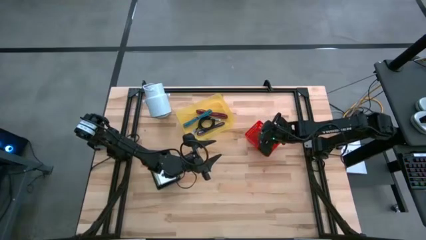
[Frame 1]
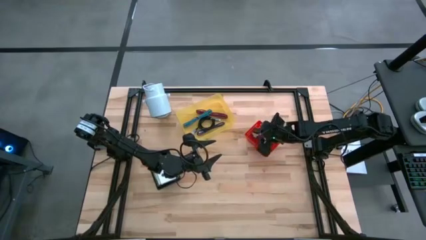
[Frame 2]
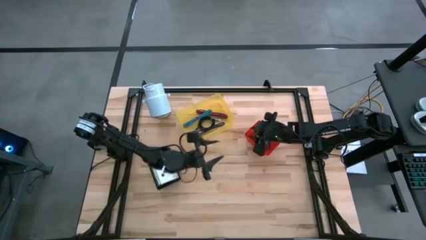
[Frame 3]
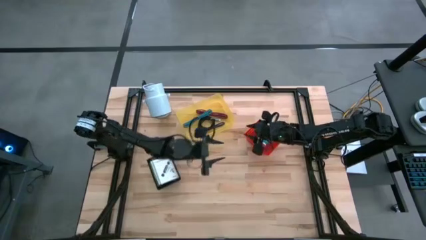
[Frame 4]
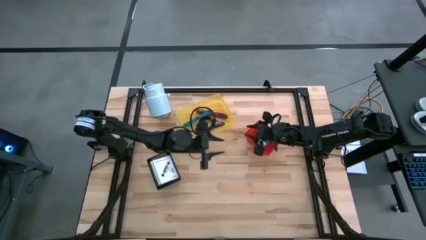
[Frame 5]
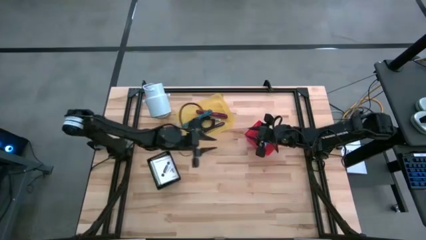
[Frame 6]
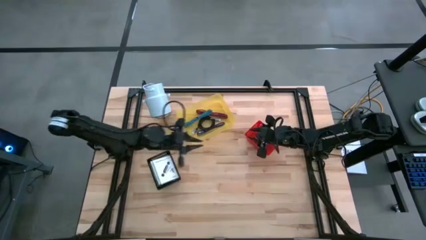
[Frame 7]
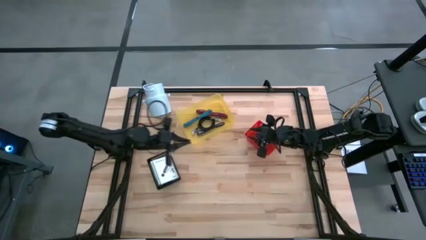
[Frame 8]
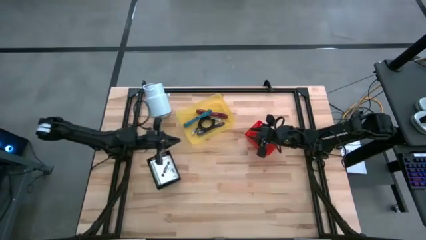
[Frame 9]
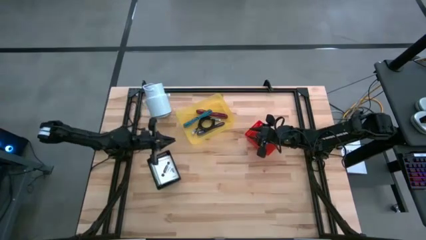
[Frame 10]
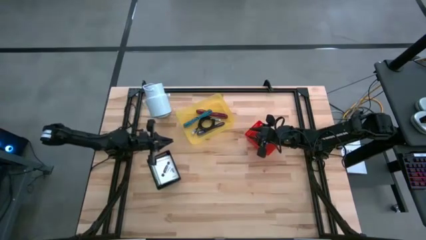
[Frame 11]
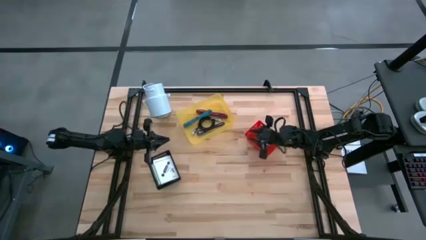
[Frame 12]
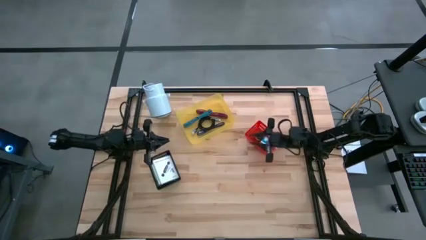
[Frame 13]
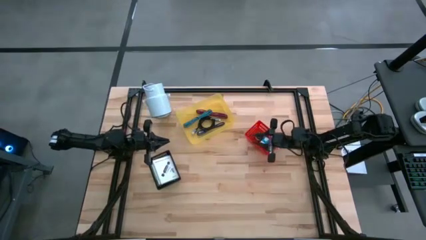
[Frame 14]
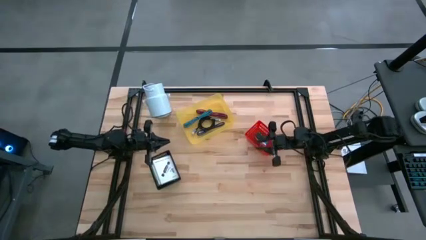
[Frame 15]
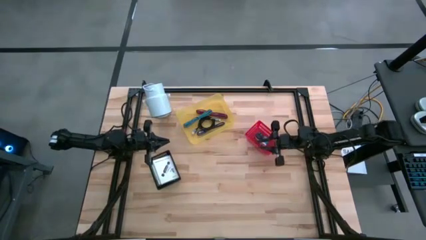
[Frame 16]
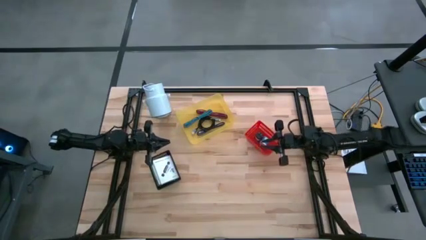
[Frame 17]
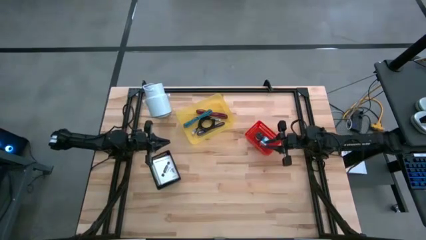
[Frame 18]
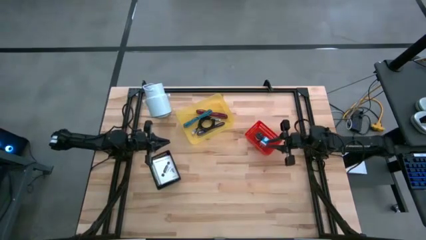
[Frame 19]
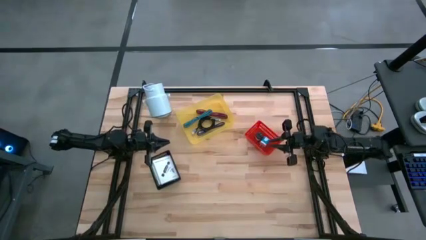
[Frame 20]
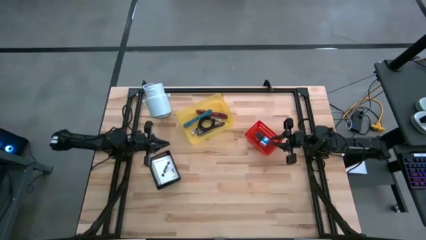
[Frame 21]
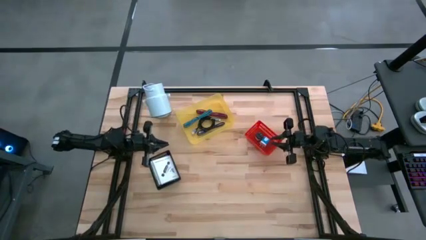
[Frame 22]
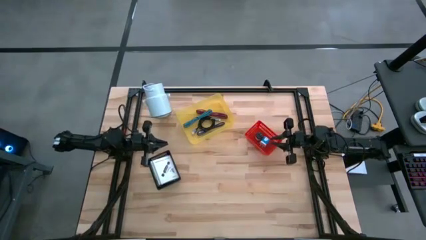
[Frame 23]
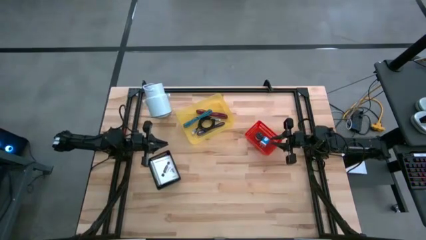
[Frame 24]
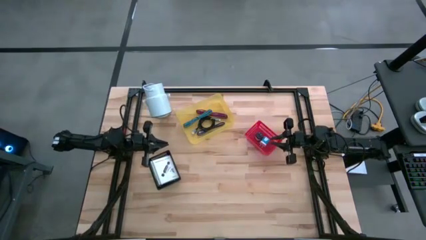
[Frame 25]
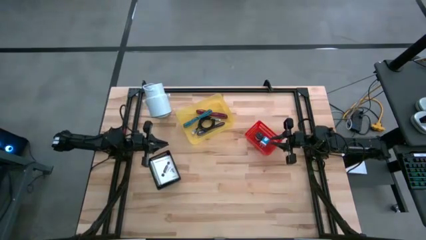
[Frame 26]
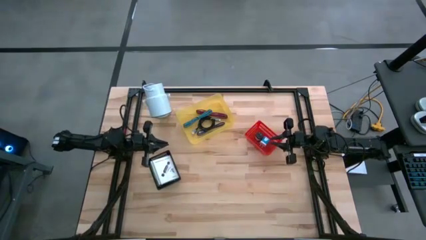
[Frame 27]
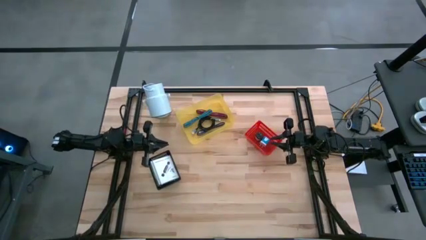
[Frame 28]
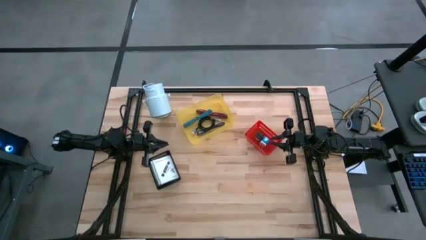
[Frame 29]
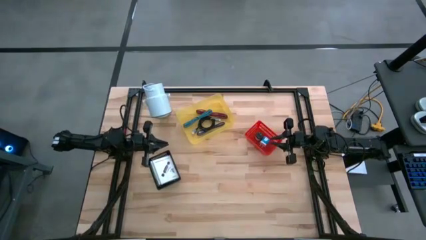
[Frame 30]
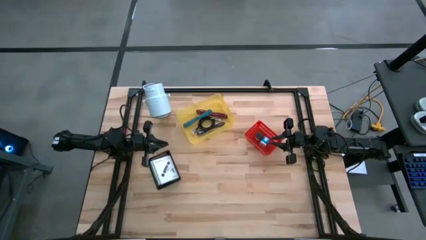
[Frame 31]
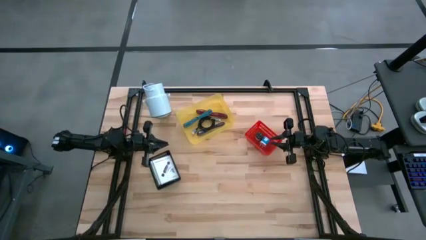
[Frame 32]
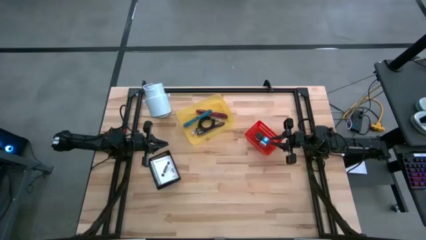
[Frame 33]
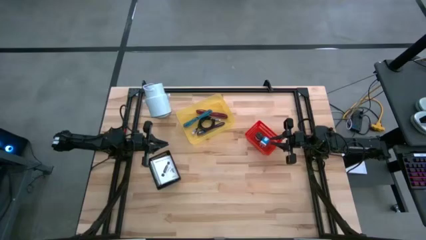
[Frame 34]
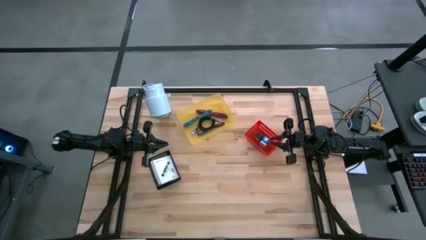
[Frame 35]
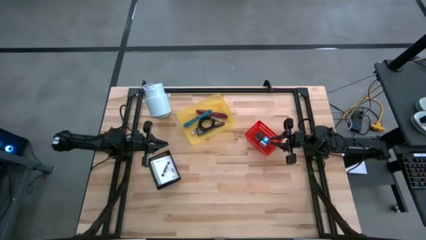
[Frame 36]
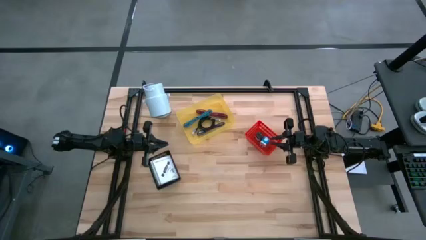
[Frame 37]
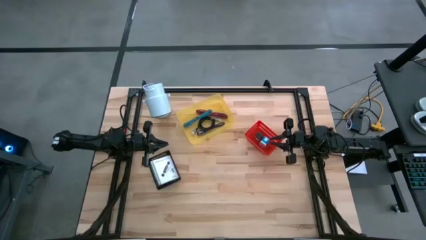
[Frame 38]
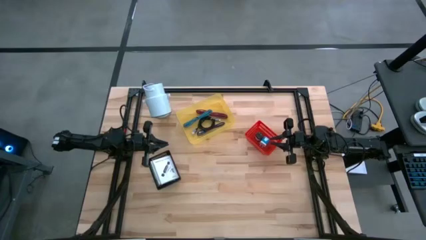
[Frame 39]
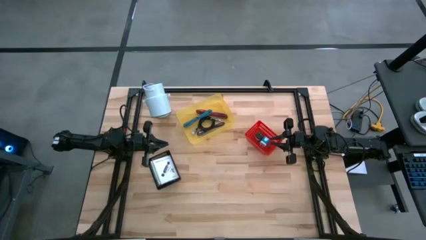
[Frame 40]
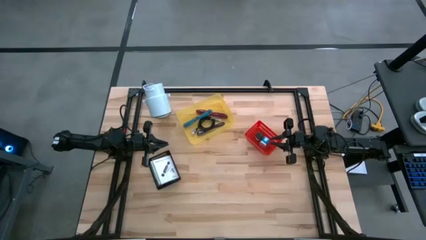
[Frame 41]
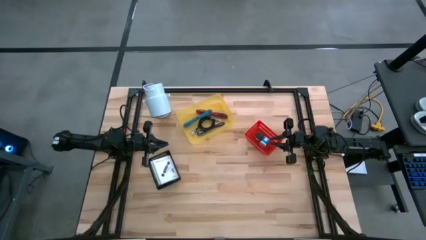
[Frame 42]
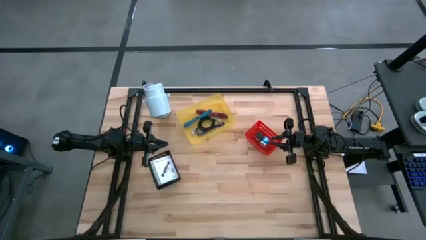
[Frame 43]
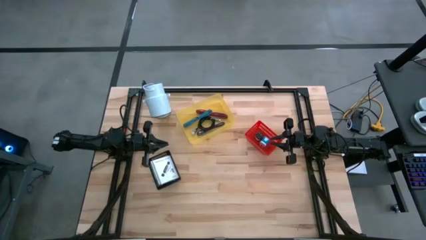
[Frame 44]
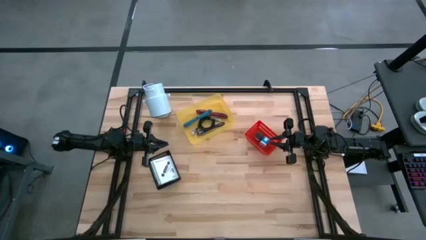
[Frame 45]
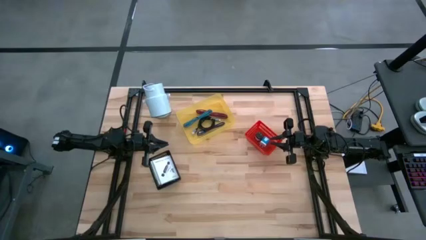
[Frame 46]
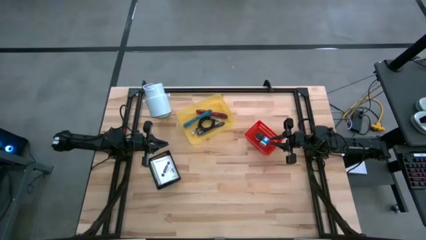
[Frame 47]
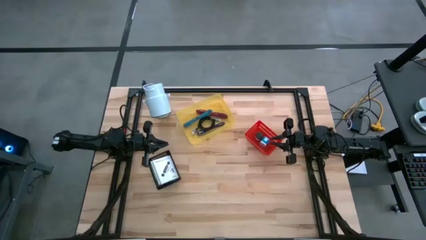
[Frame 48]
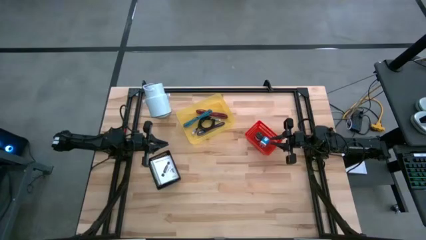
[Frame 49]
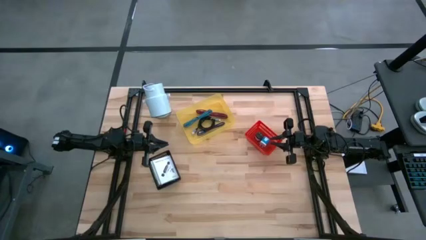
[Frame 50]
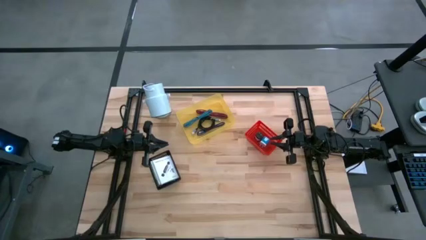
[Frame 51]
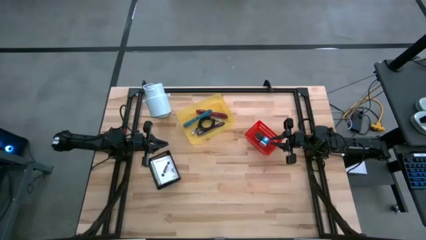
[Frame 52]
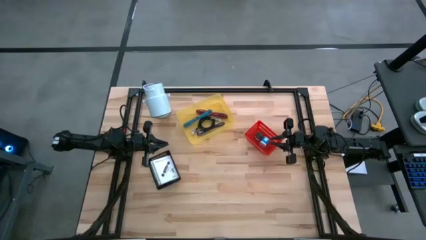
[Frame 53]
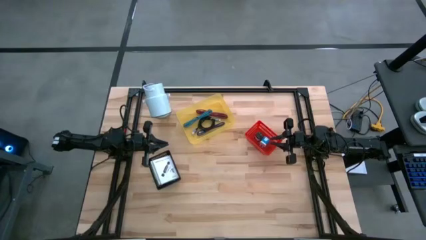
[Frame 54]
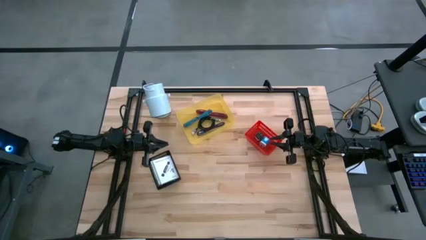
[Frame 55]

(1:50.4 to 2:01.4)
Task: Pick and place items into bin
Return to Home Position

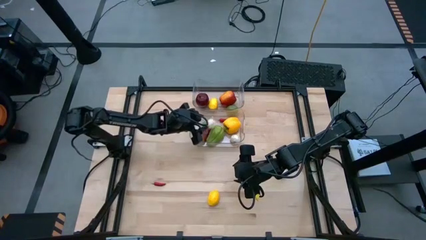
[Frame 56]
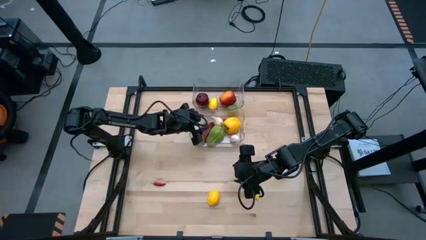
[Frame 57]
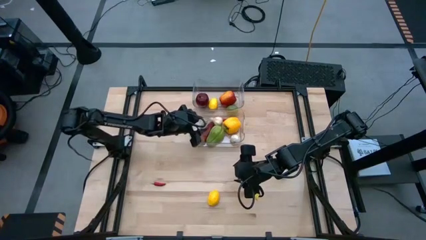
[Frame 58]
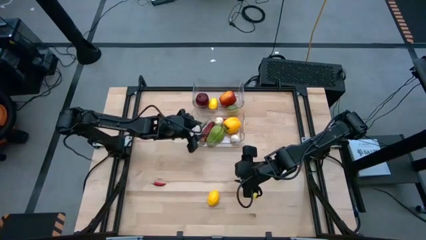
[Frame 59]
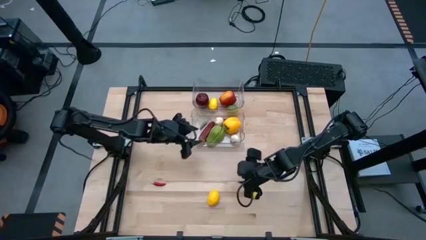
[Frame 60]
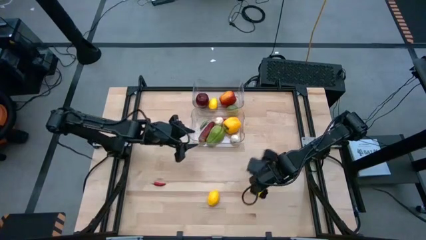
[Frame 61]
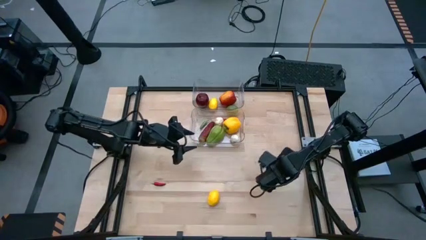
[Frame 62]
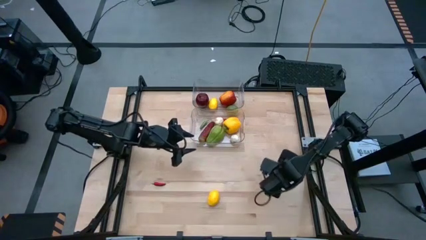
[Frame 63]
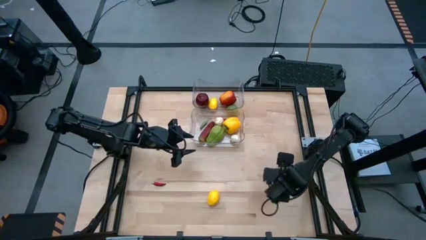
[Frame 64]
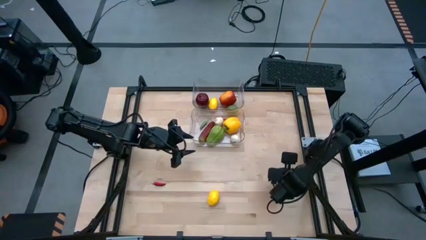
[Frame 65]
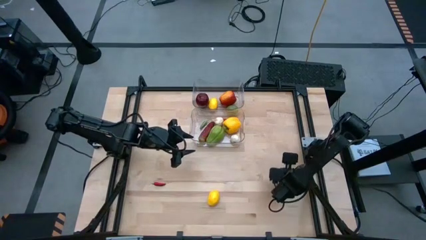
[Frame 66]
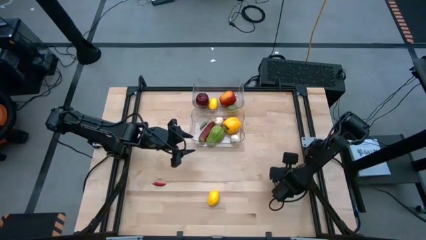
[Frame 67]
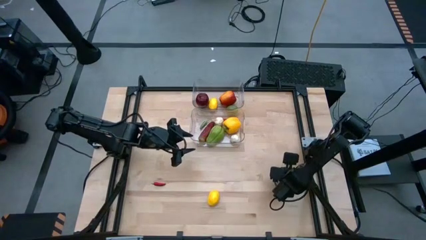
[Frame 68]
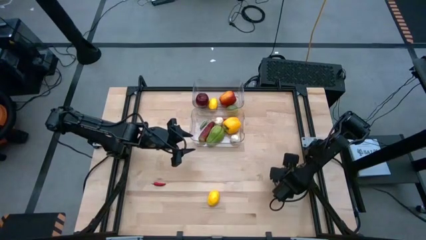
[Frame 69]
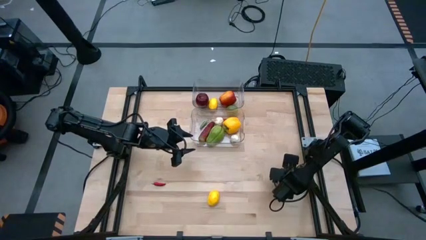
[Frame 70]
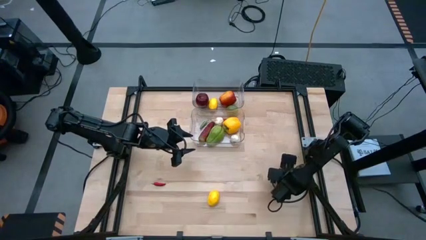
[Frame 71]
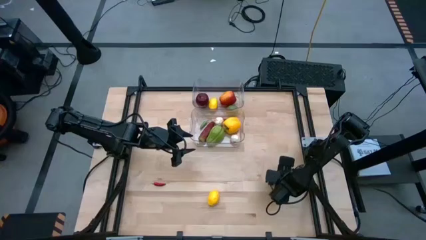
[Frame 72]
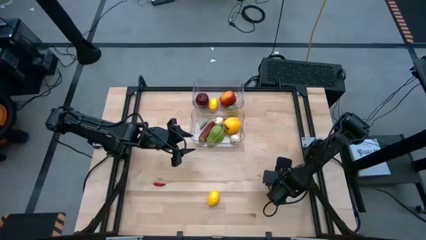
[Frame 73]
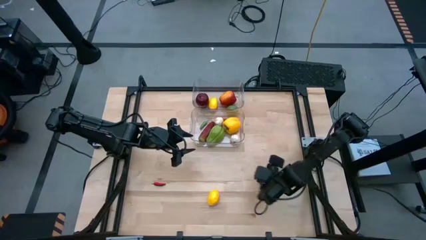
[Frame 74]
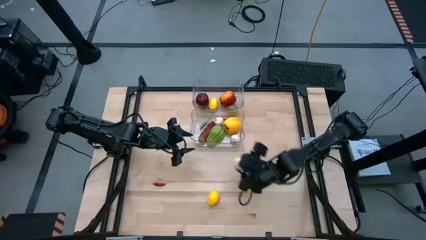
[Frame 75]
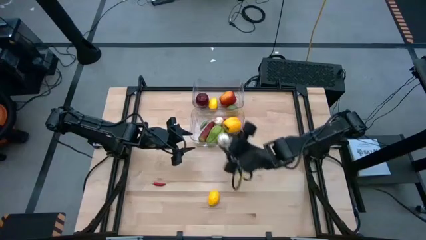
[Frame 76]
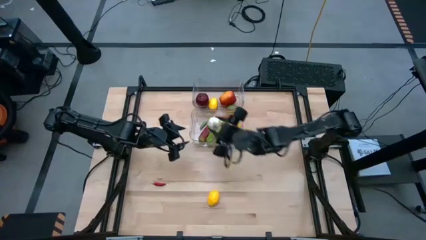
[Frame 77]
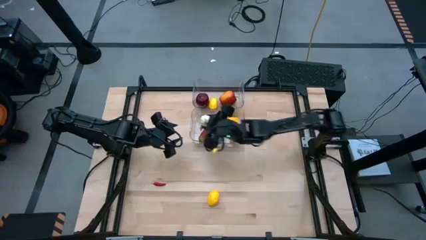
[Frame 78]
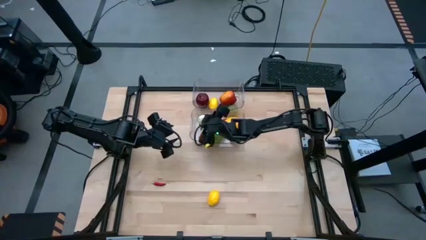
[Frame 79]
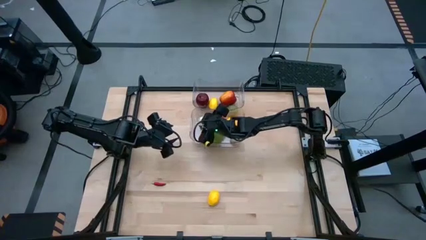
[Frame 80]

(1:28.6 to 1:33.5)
Task: Sort produce into baskets
Put the garlic into the bottom transparent bin
